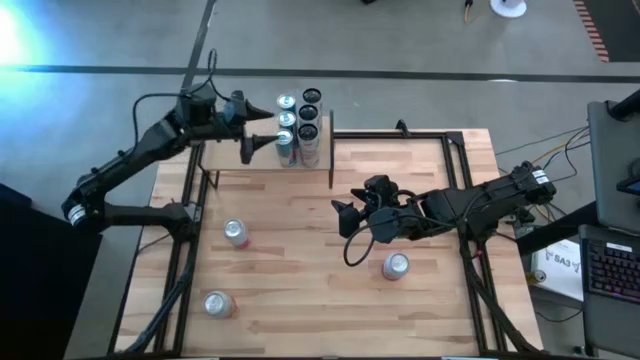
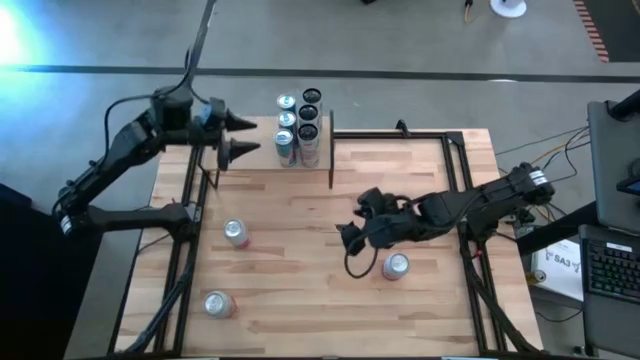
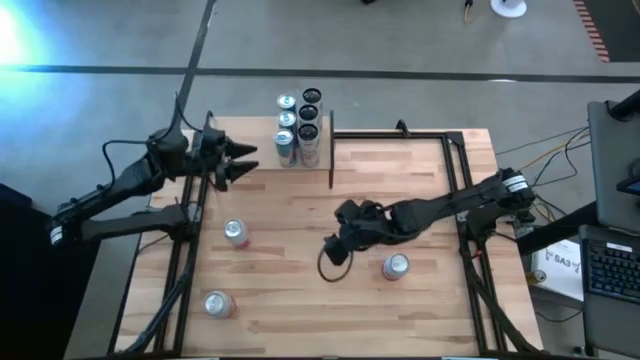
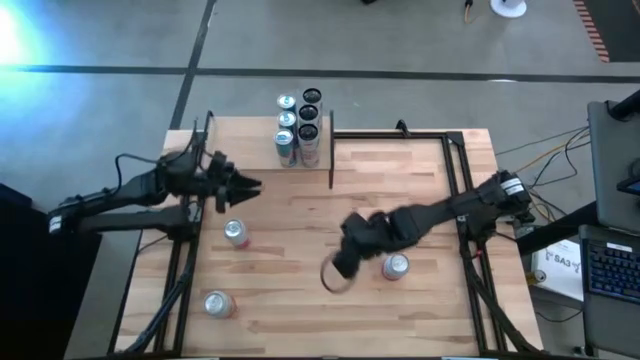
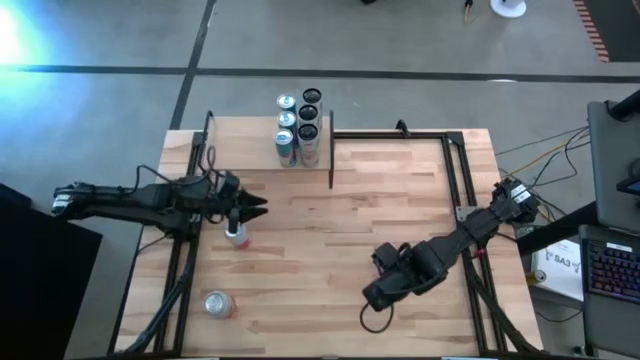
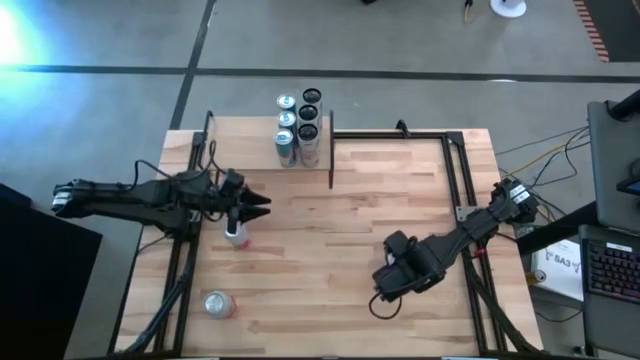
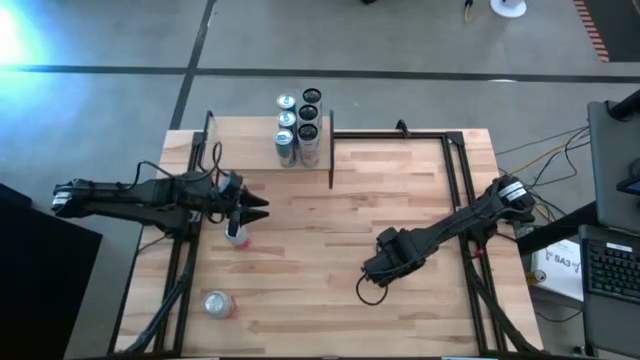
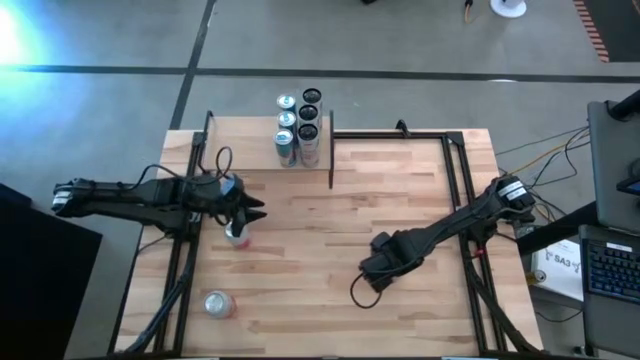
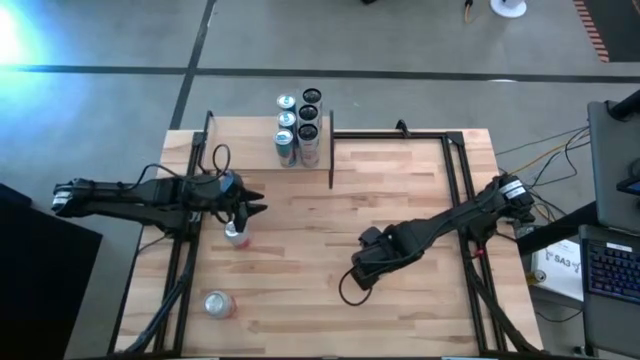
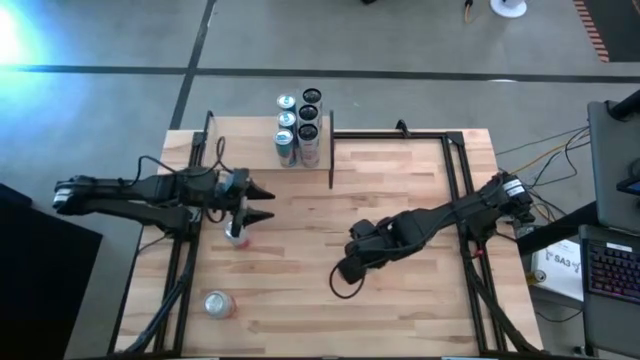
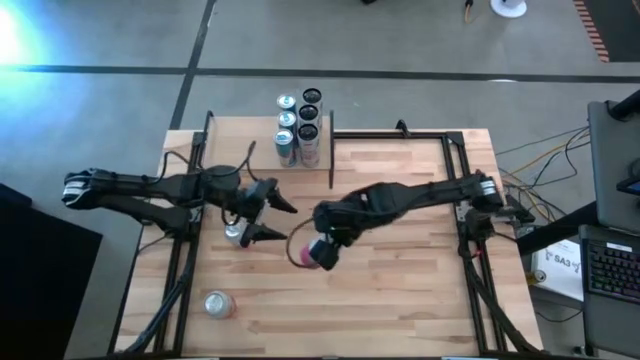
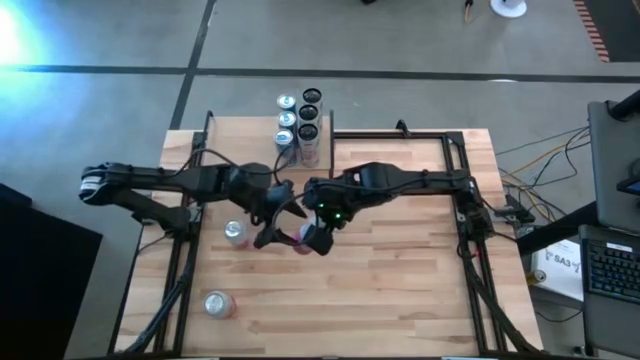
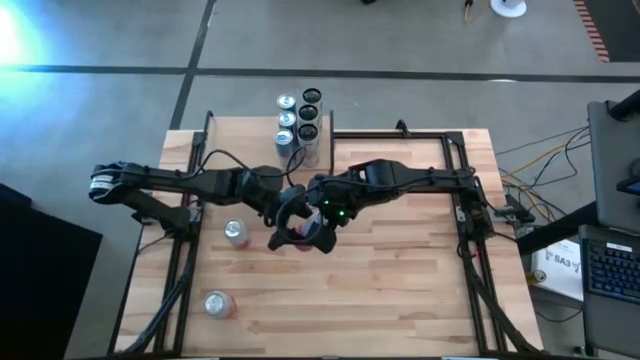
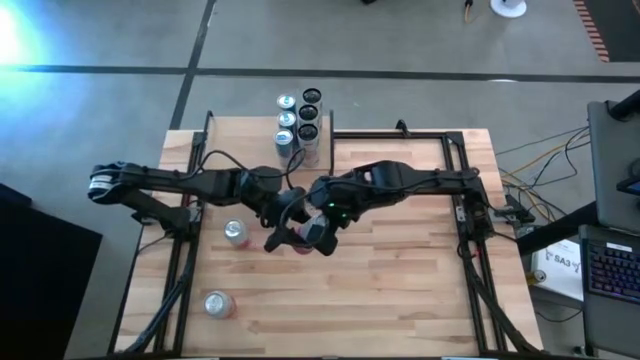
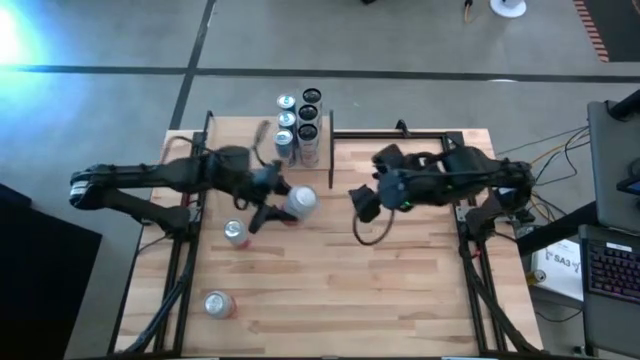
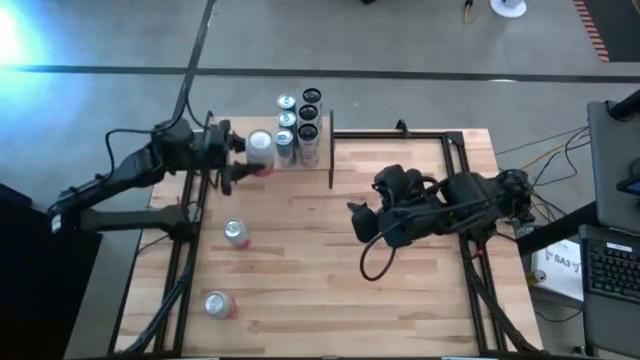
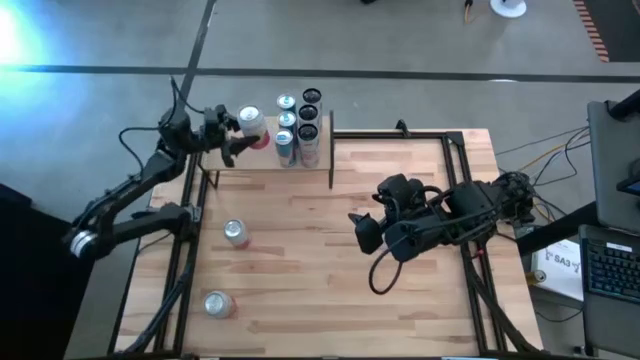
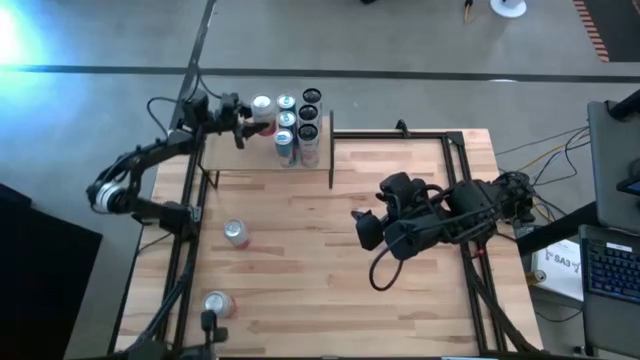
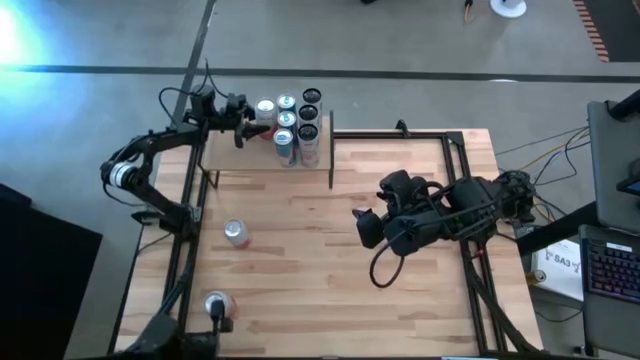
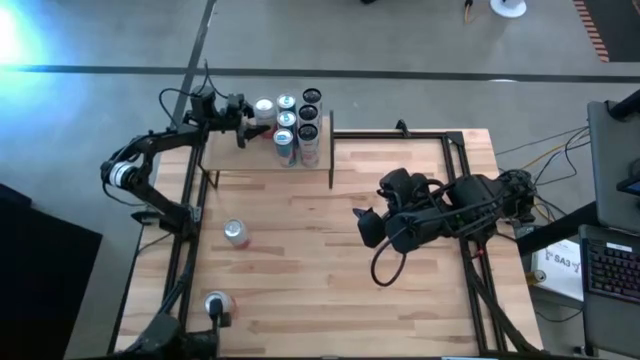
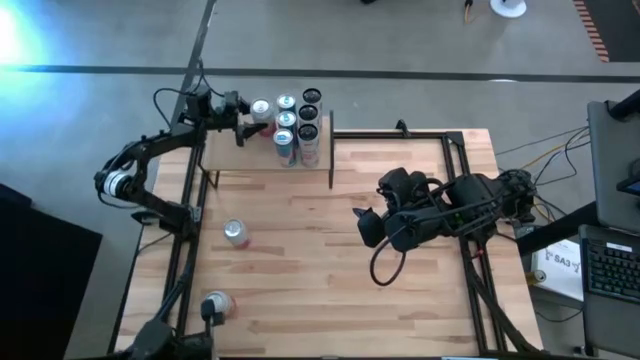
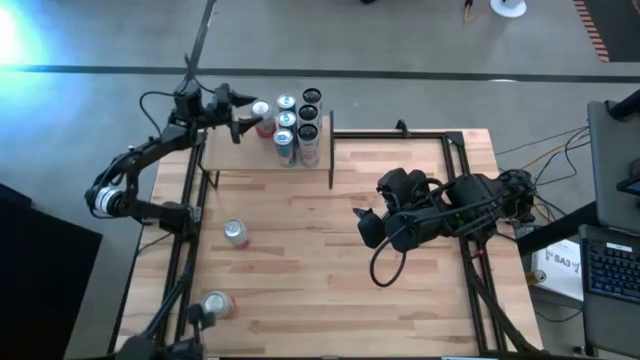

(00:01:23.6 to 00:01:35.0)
Task: Place canned beverage on shelf
Put the right pink-white soda can on the shelf

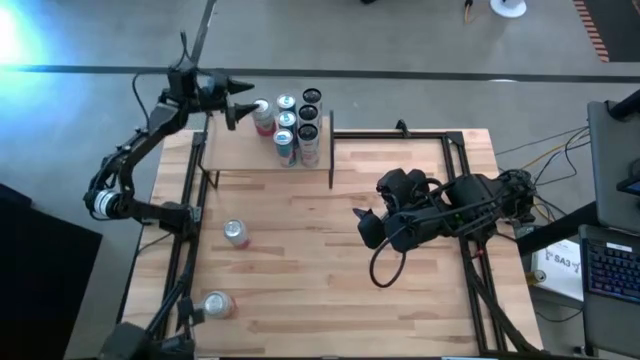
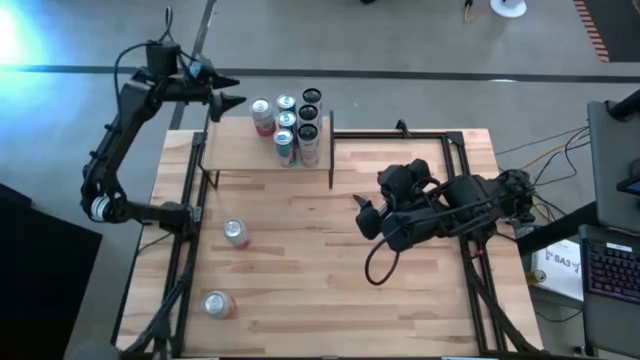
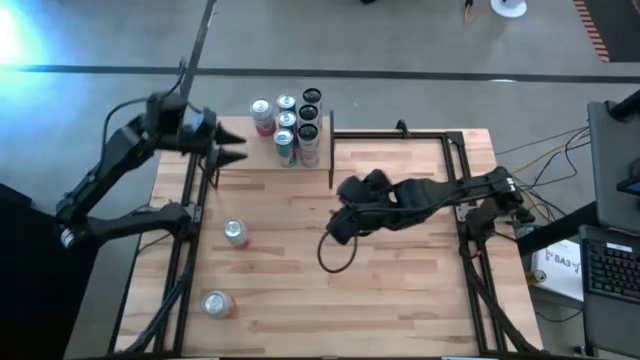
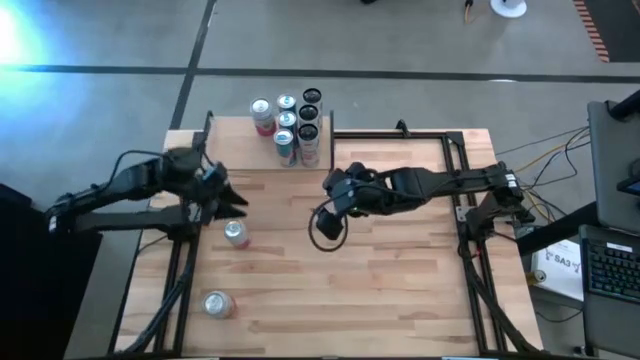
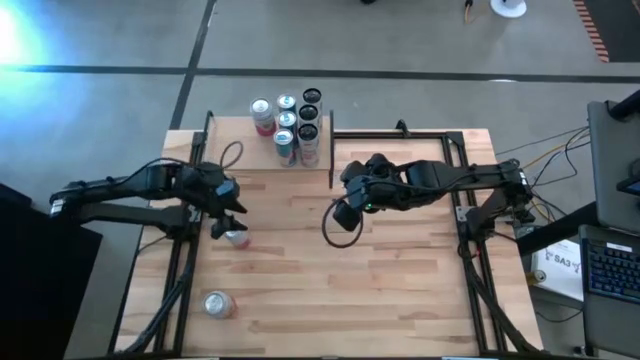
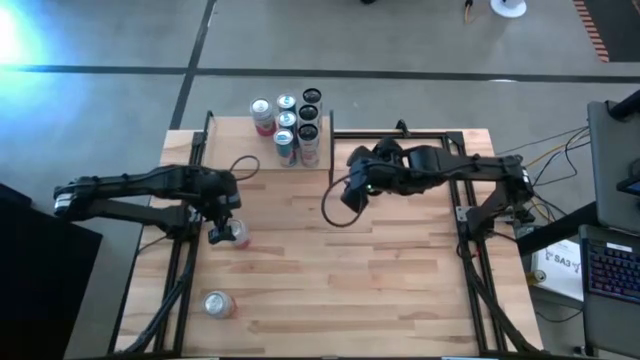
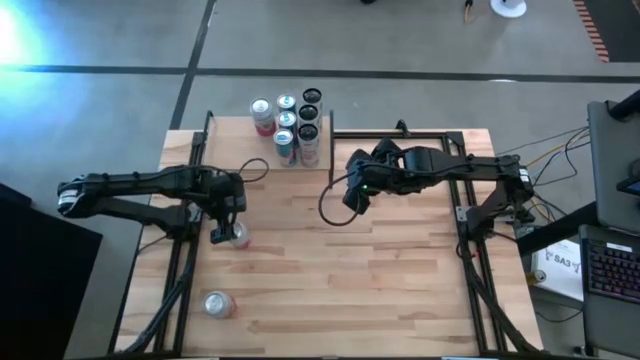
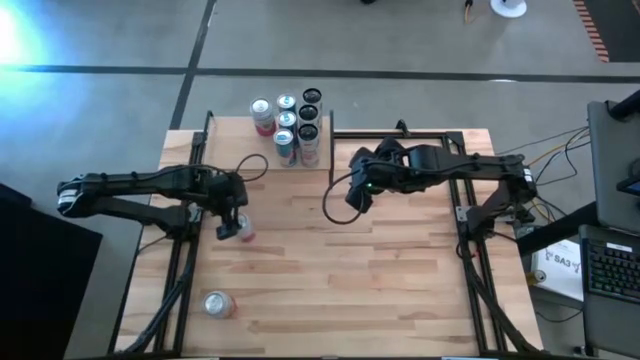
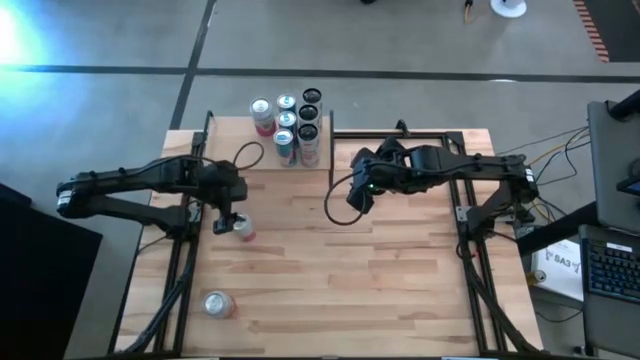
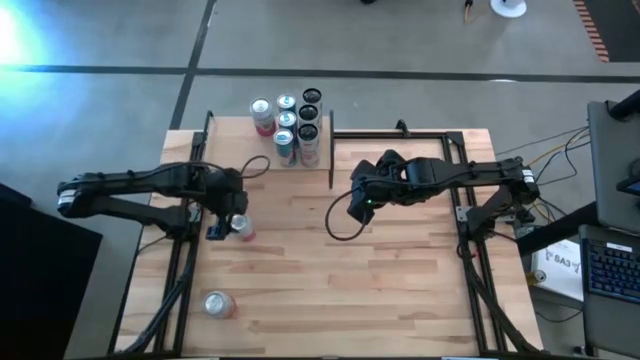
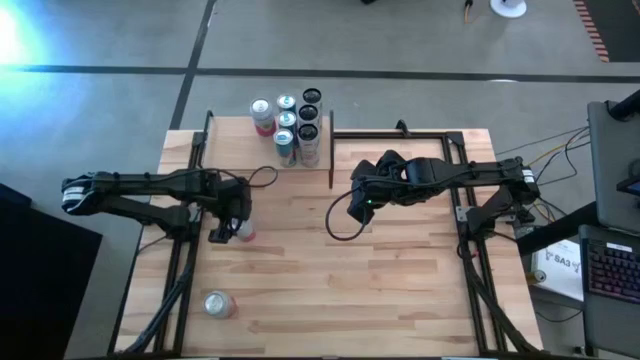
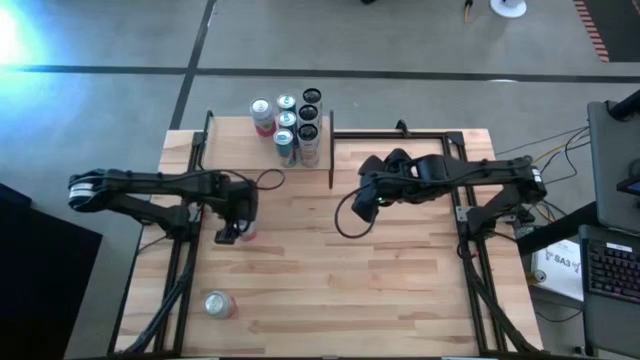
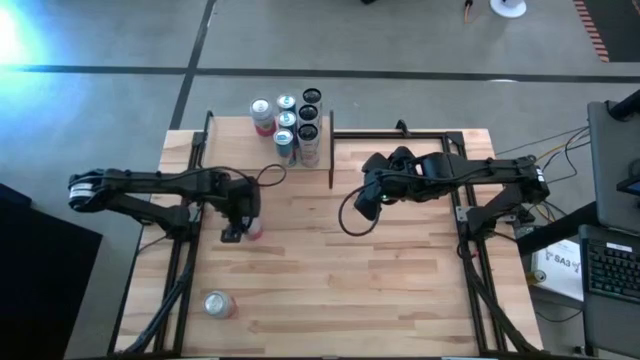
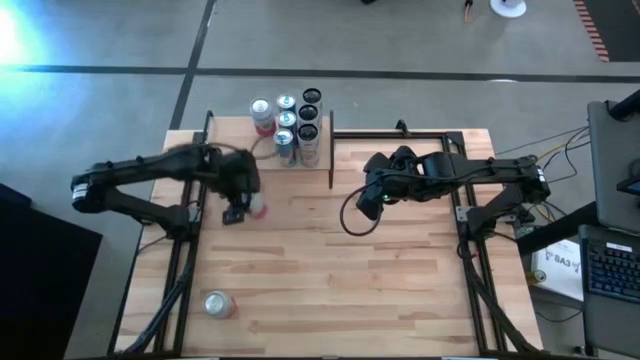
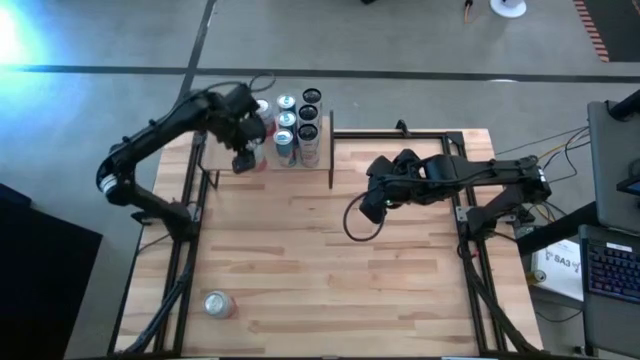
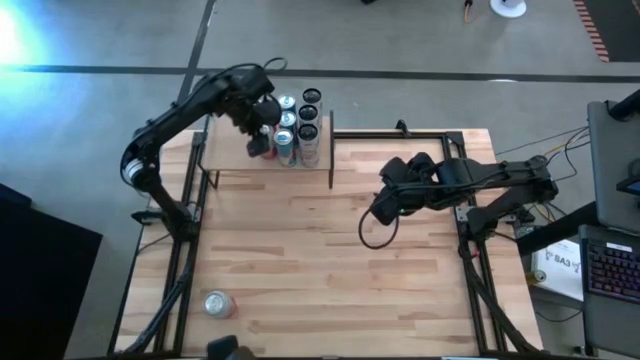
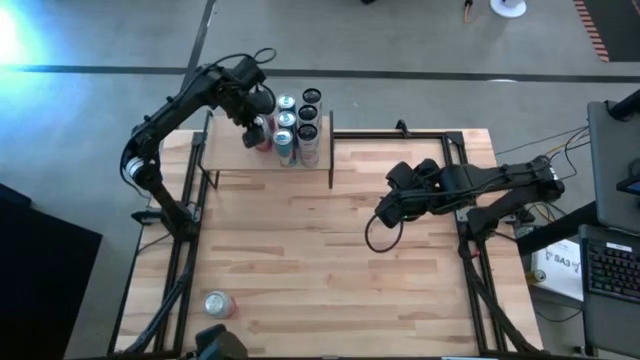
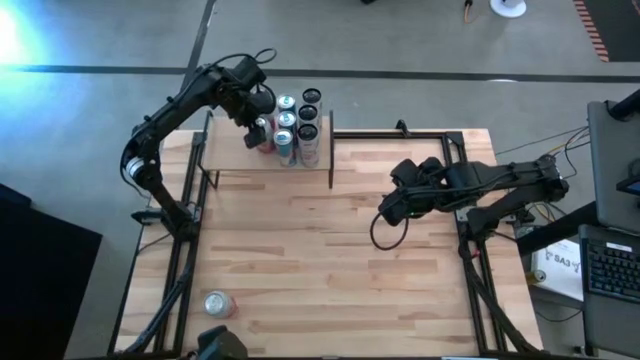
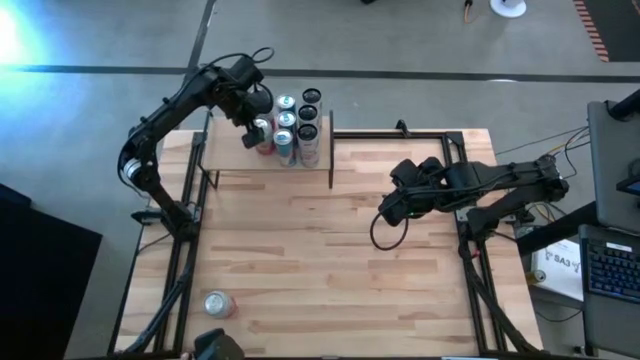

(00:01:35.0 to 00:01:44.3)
Put the top left pink-white soda can on the shelf aligned with the other pink-white soda can

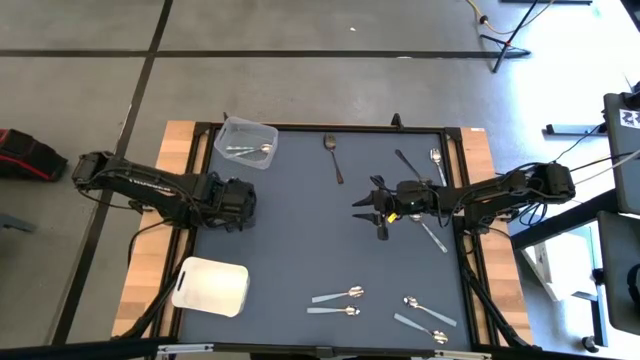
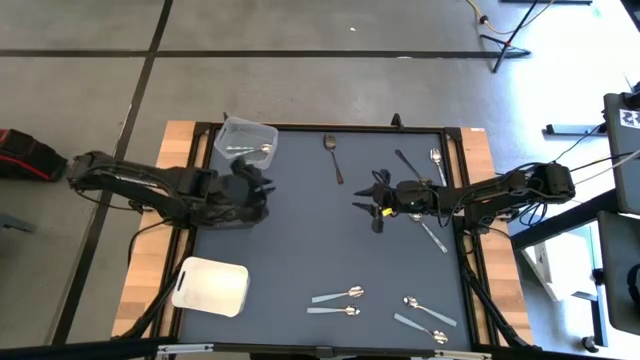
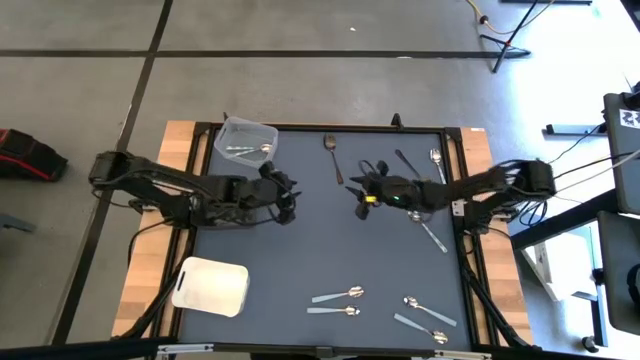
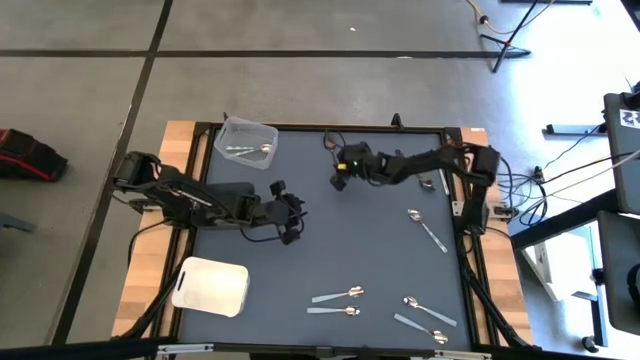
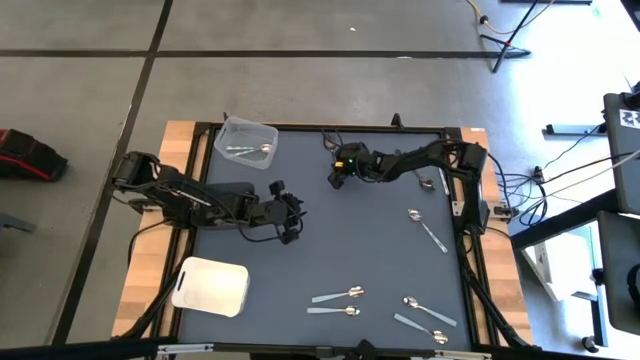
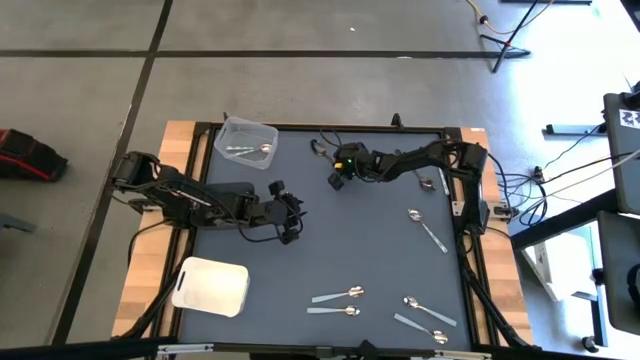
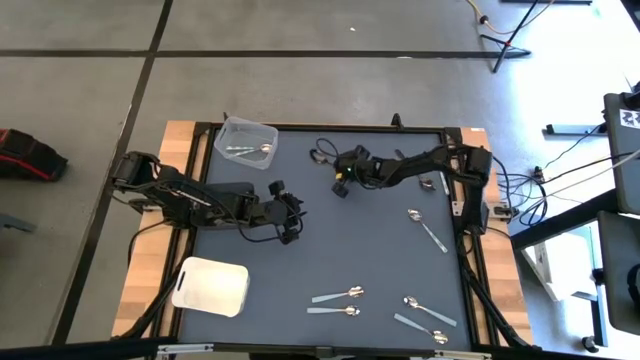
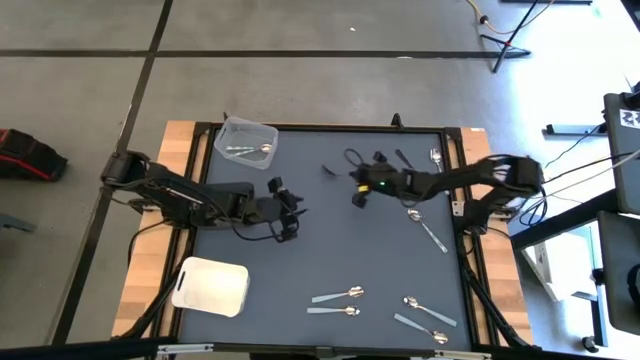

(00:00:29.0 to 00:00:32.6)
Task: Sort silverware by color (type)
Put the black spoon into the black bin
